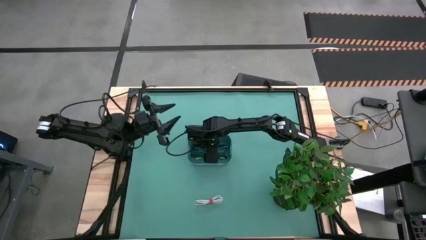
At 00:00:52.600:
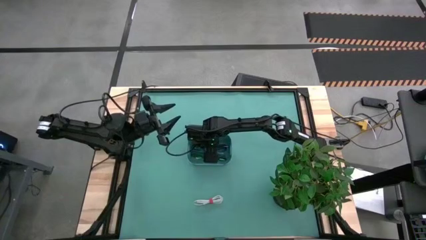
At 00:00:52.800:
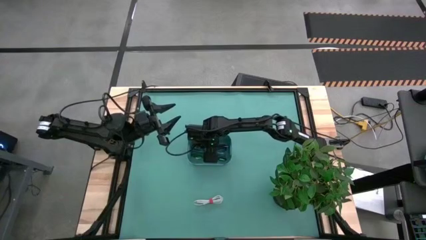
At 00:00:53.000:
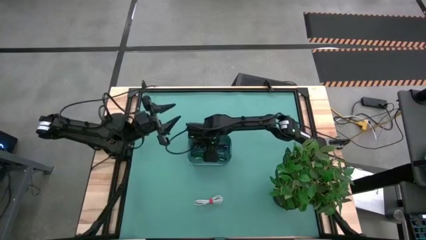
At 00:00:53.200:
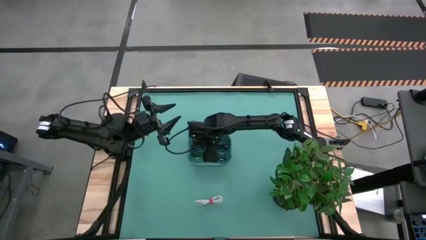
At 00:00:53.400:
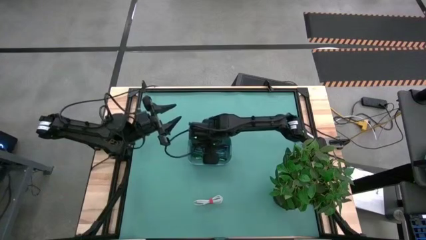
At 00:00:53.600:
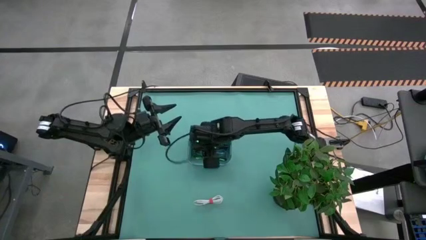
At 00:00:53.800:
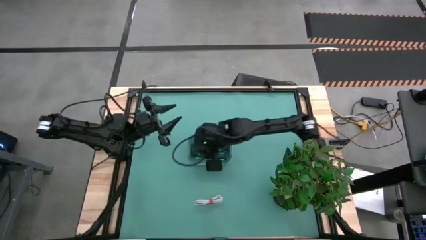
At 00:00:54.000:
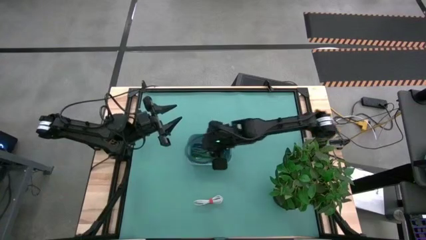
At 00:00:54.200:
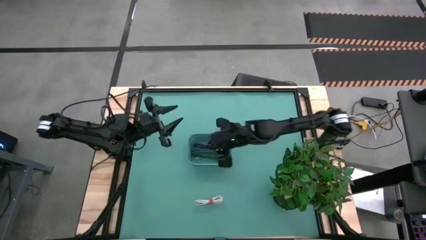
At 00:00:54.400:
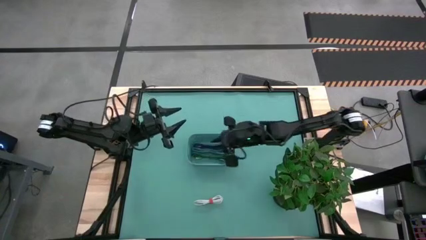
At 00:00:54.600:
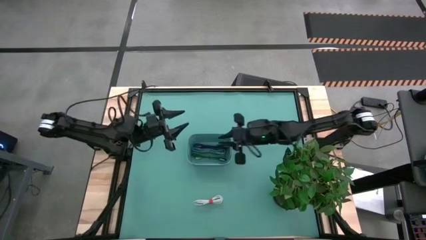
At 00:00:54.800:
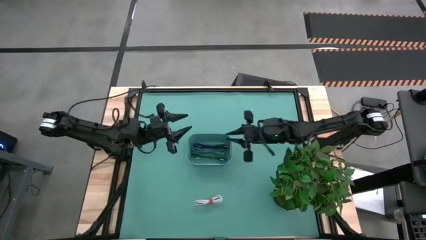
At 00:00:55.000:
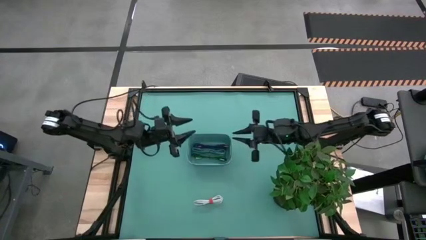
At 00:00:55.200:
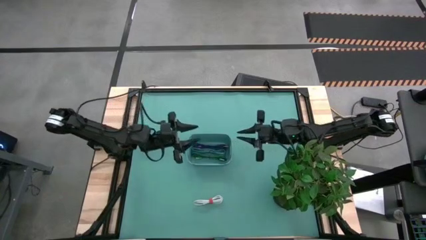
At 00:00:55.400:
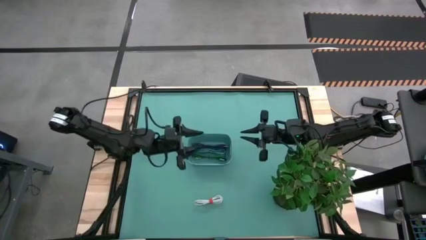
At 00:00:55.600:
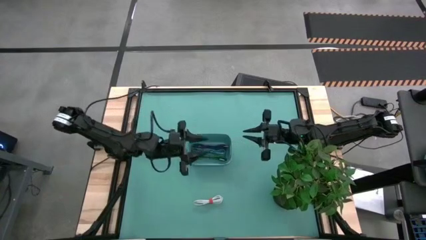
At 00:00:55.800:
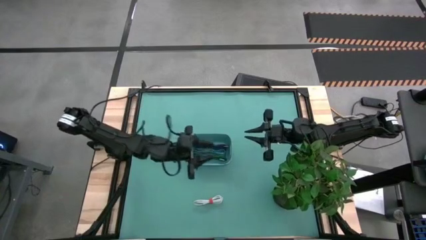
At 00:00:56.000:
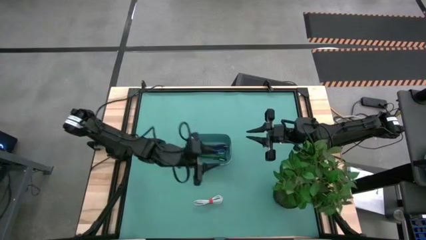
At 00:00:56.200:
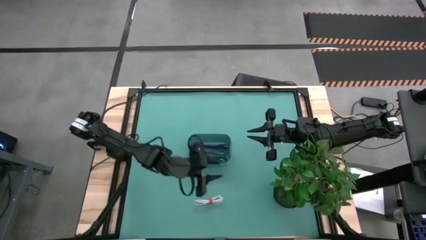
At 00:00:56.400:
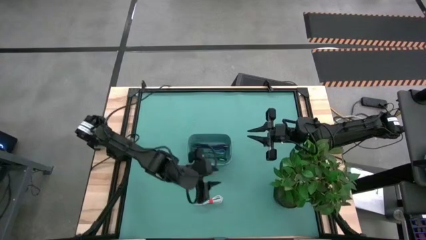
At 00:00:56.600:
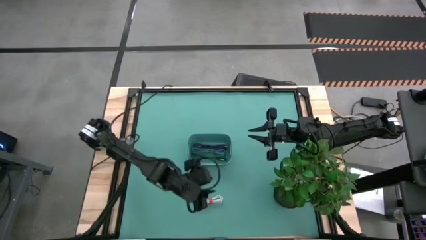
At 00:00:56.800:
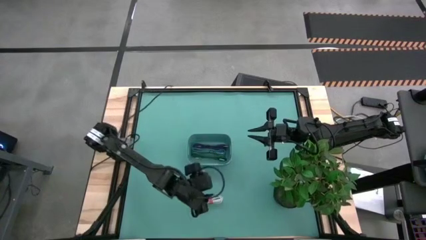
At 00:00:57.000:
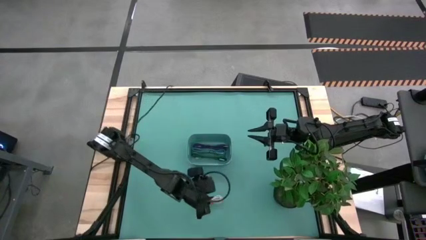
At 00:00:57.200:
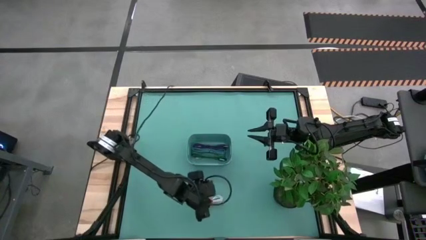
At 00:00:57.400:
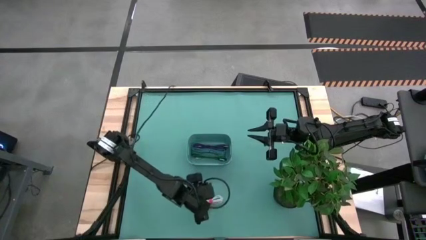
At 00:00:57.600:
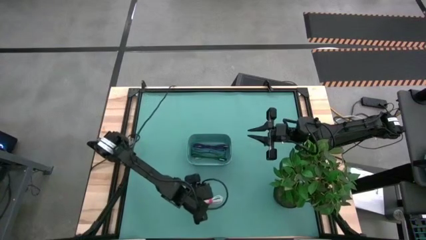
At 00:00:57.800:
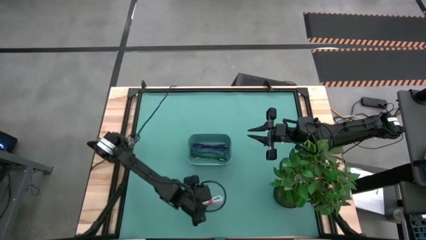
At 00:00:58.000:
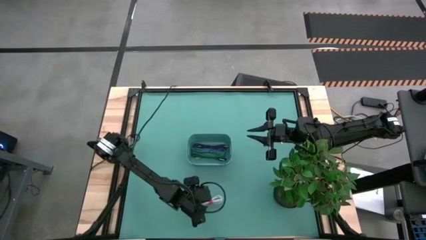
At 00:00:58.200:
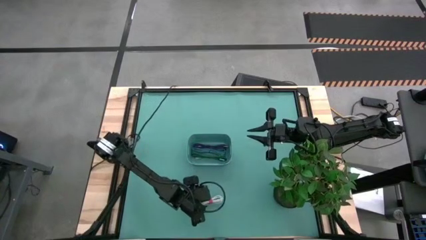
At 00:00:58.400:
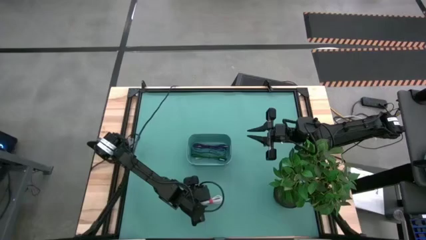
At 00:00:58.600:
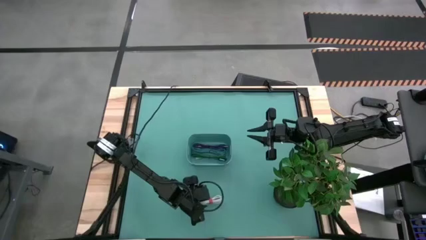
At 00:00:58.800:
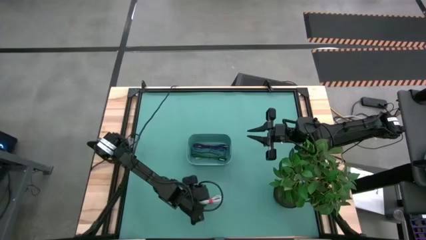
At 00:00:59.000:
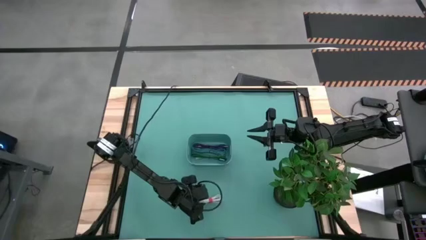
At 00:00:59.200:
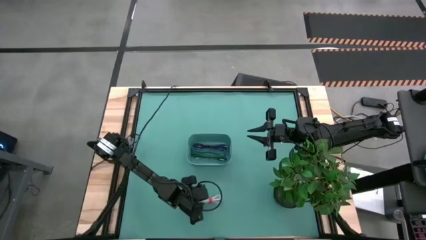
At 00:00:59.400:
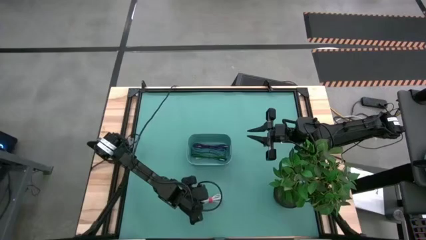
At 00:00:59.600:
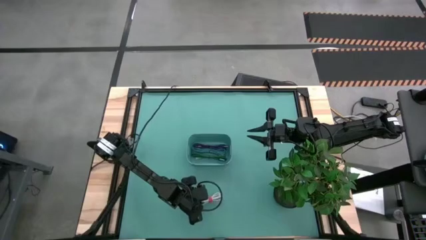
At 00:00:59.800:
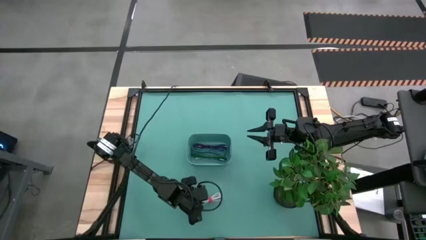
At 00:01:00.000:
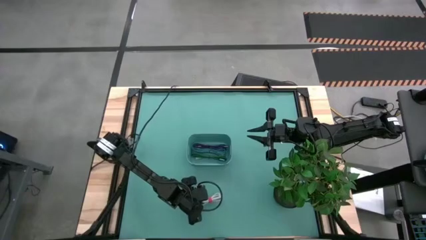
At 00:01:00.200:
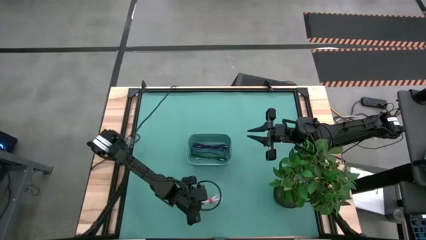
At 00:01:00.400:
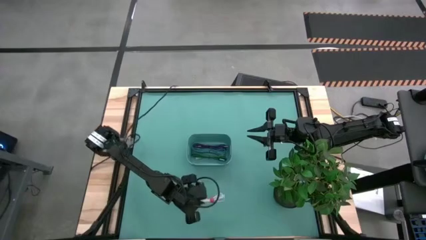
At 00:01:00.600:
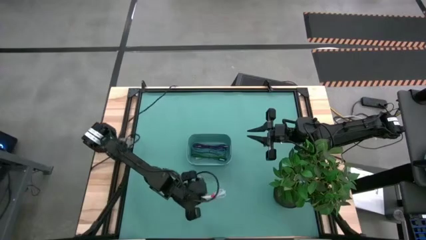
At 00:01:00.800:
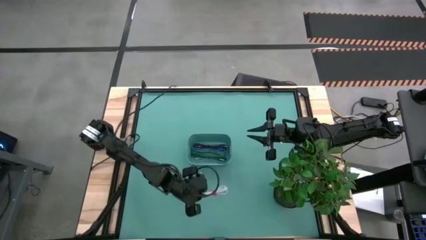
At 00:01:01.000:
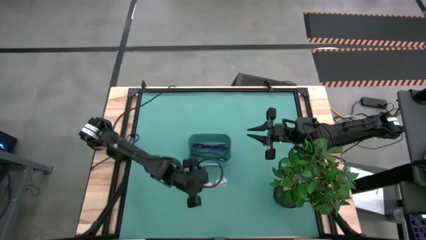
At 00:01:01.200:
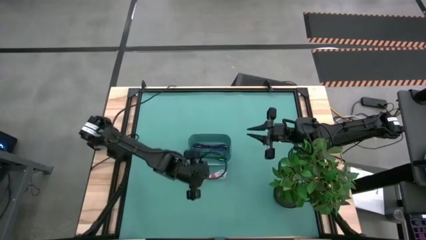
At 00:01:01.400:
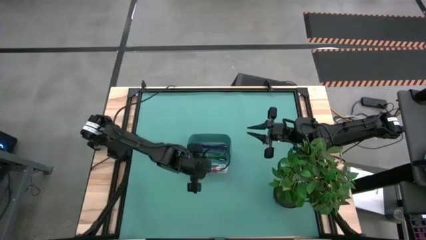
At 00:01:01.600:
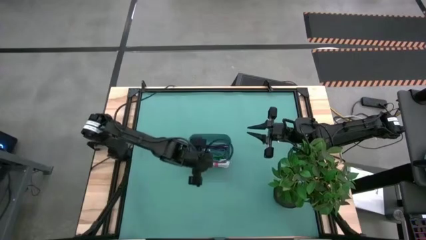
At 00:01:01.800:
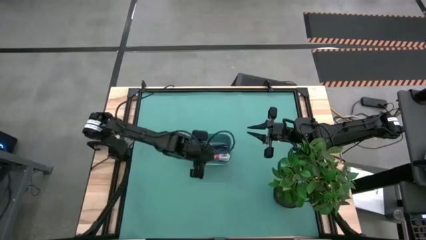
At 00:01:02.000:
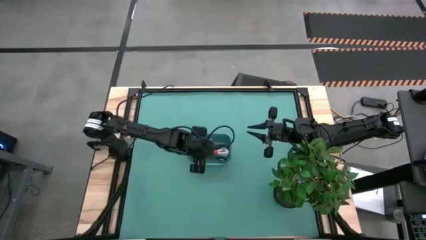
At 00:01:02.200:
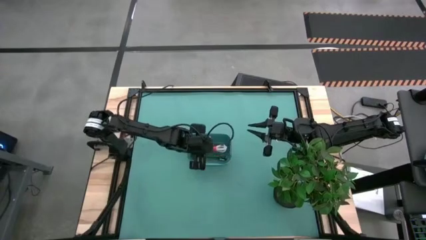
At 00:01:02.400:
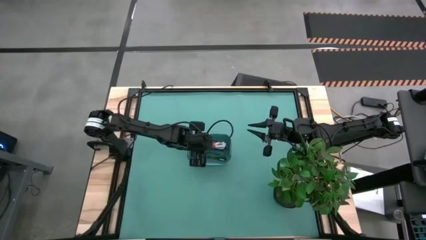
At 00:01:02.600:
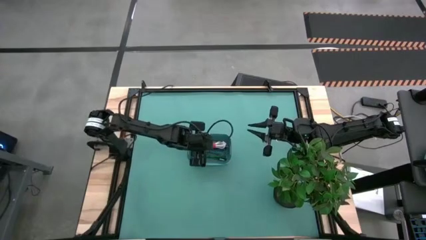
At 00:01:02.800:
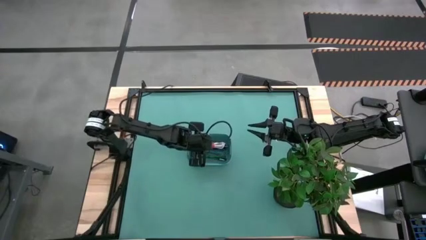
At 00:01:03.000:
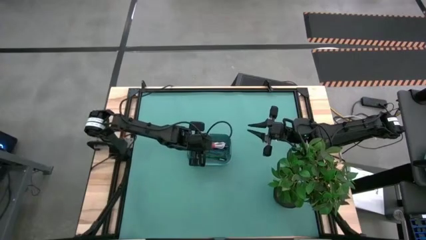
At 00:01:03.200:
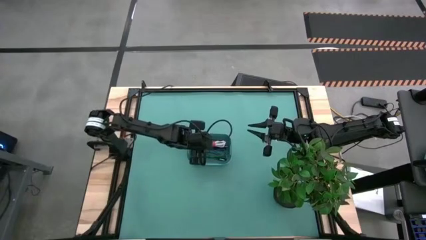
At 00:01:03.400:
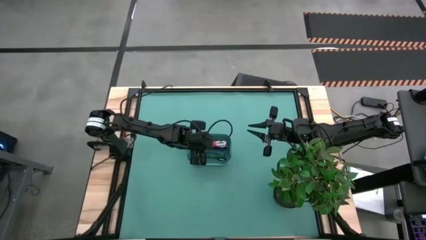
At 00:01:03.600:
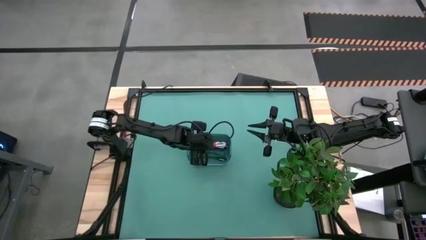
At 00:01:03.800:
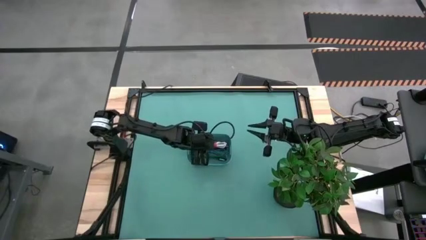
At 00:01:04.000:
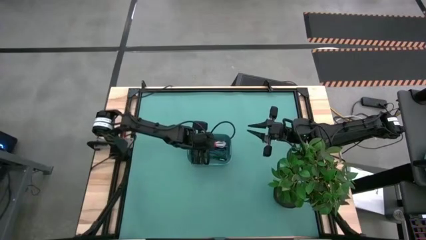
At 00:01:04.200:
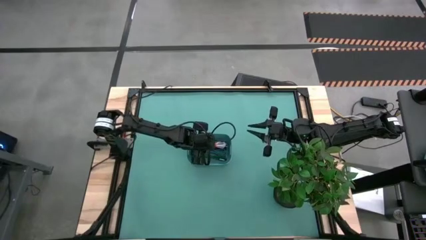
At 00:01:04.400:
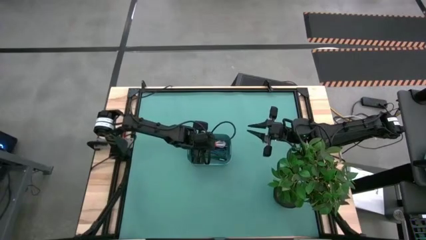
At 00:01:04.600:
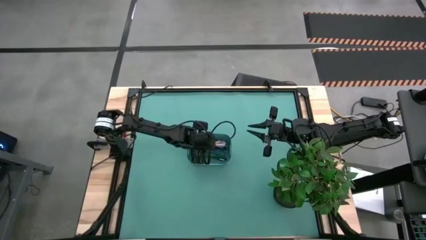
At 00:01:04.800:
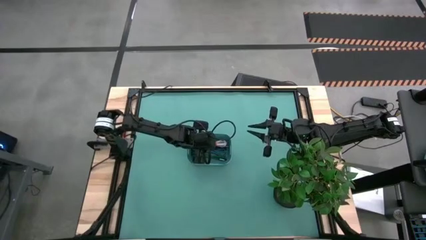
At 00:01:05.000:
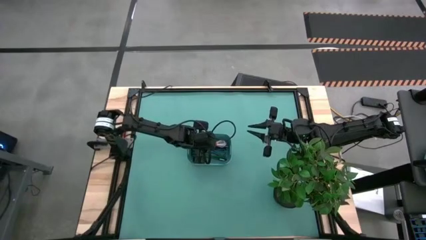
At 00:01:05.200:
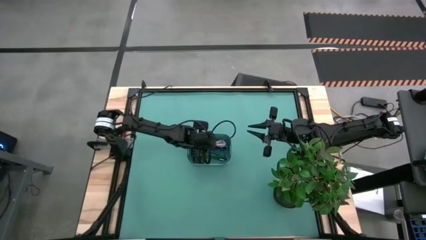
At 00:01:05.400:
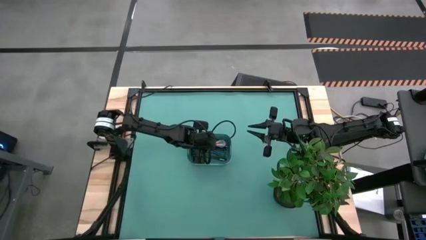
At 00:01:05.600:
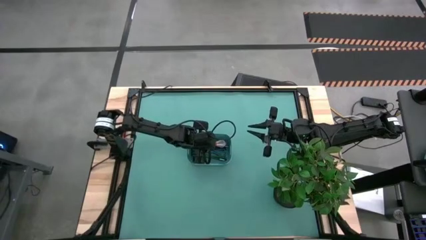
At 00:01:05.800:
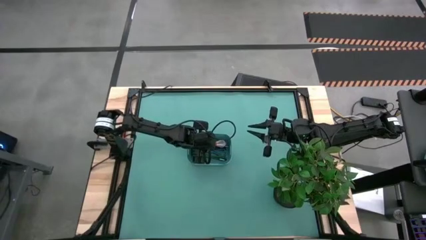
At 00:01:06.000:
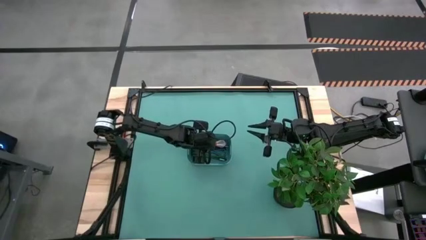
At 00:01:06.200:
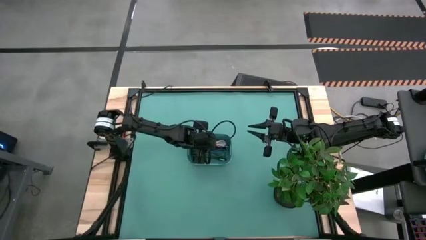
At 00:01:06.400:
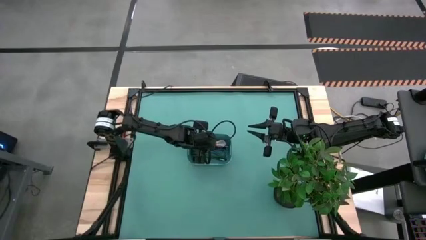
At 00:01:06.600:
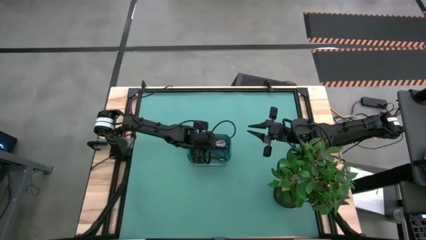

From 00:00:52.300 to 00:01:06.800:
Task: Pick and place USB-C Cables
Put the white charger cable into the green bin
